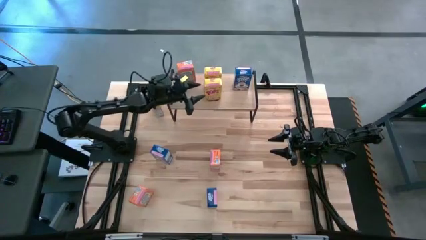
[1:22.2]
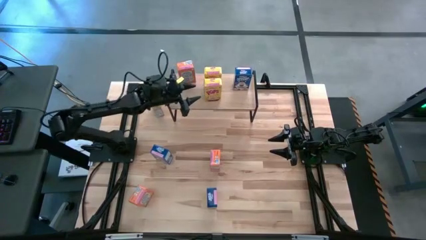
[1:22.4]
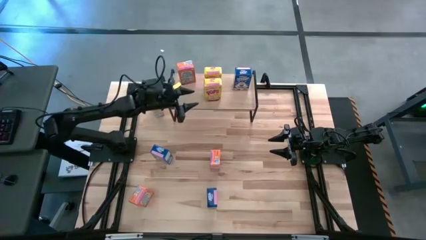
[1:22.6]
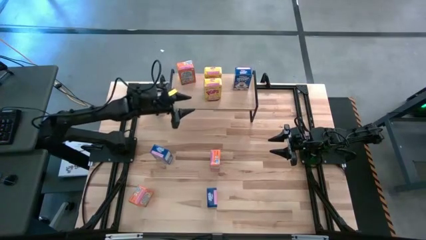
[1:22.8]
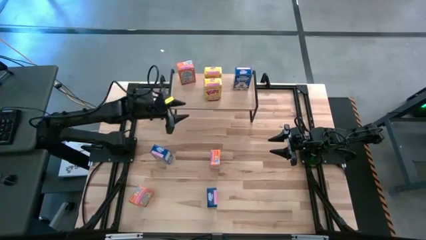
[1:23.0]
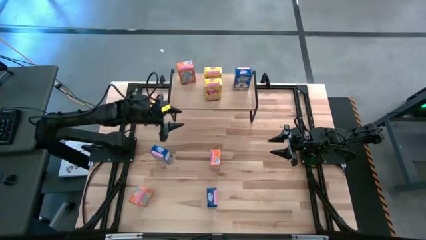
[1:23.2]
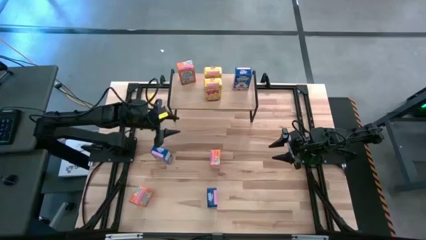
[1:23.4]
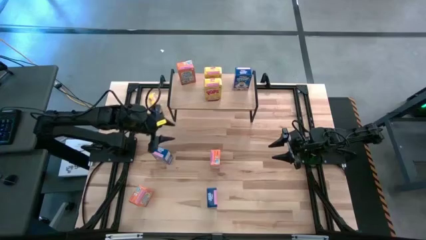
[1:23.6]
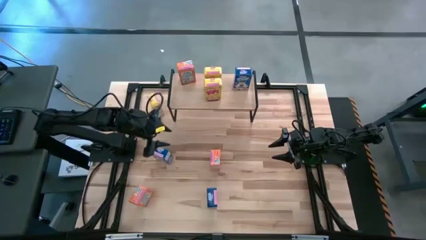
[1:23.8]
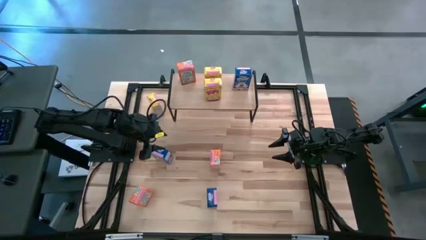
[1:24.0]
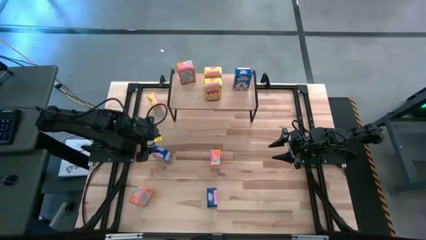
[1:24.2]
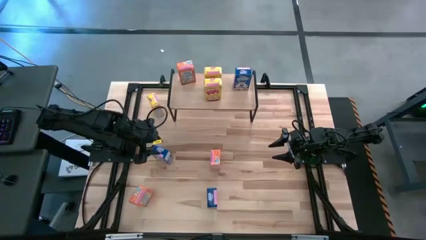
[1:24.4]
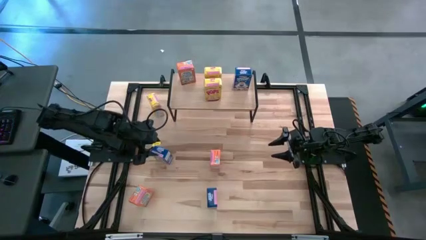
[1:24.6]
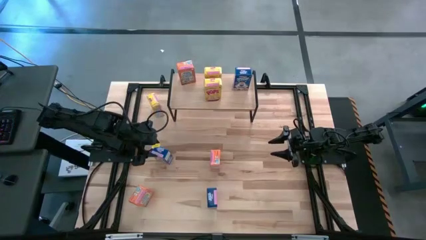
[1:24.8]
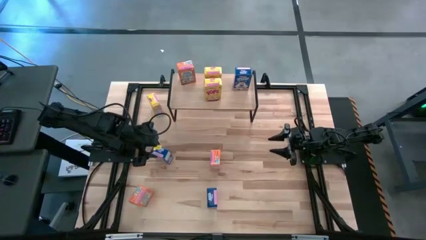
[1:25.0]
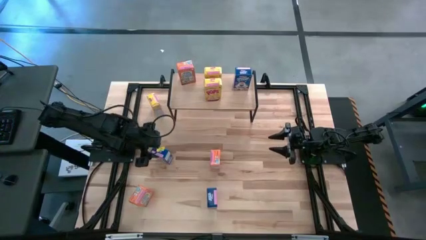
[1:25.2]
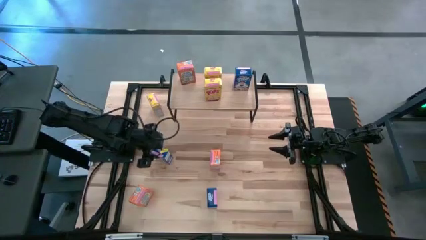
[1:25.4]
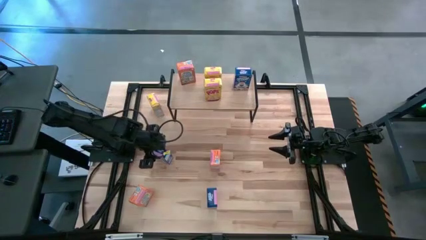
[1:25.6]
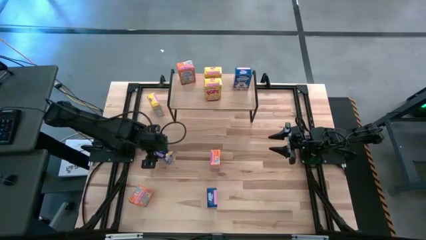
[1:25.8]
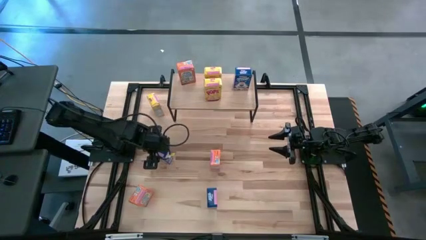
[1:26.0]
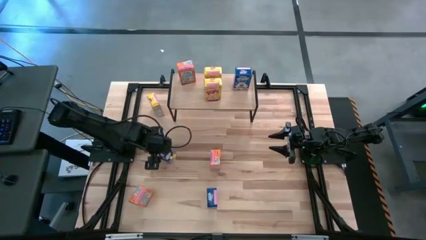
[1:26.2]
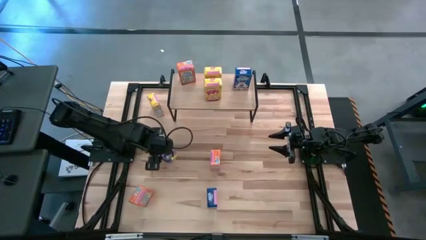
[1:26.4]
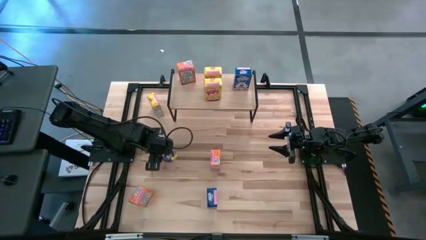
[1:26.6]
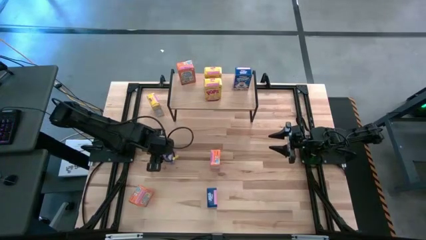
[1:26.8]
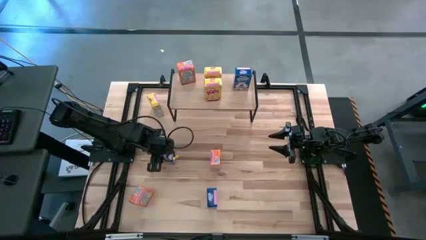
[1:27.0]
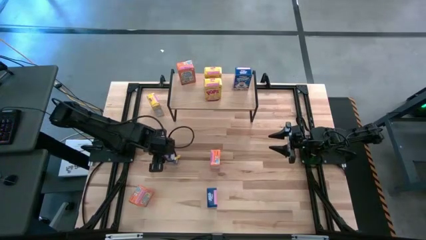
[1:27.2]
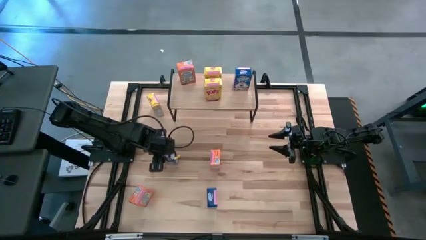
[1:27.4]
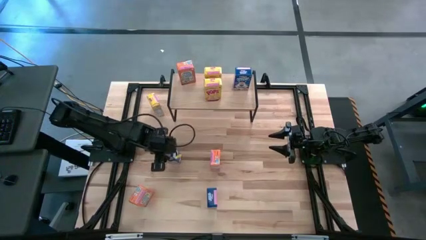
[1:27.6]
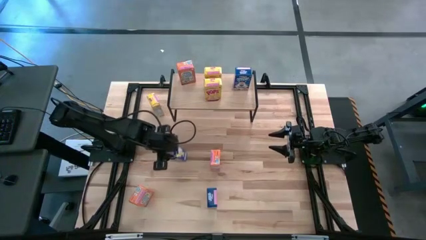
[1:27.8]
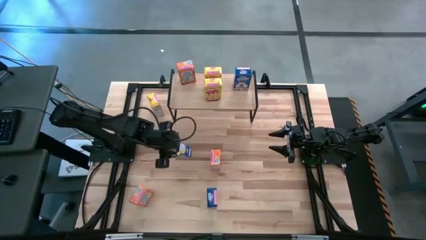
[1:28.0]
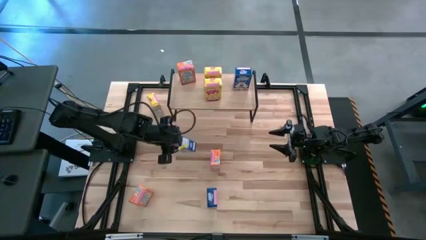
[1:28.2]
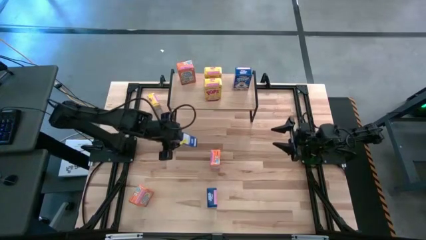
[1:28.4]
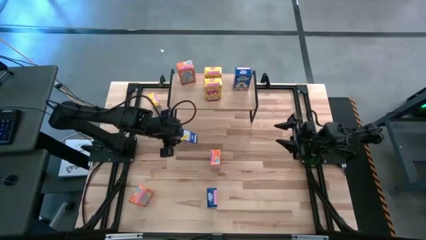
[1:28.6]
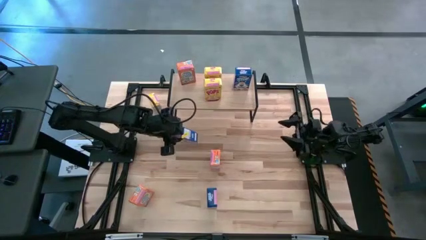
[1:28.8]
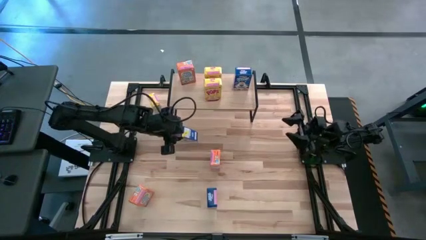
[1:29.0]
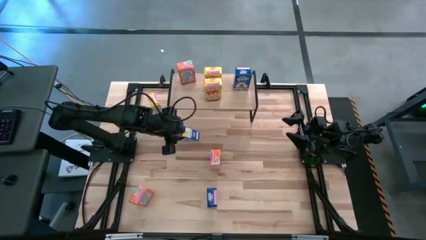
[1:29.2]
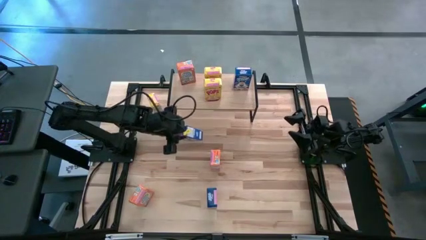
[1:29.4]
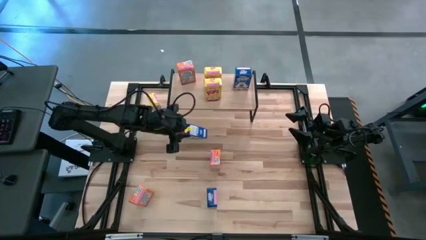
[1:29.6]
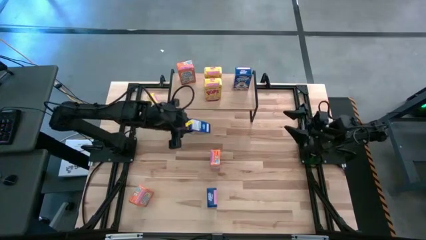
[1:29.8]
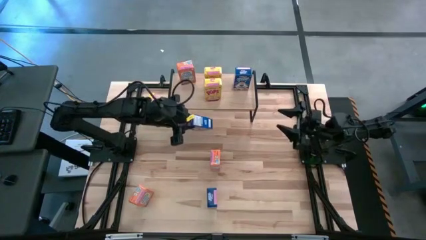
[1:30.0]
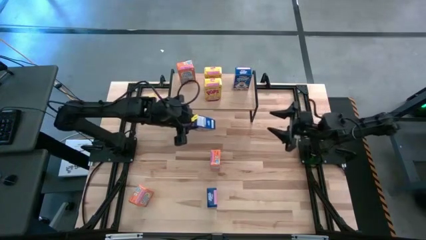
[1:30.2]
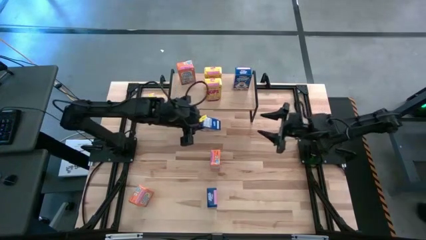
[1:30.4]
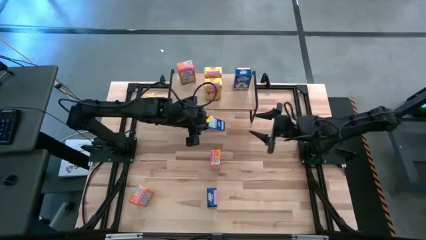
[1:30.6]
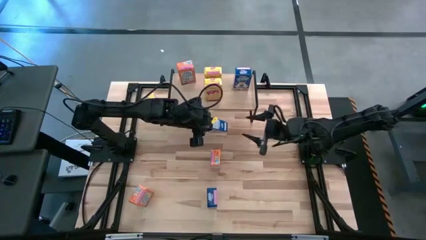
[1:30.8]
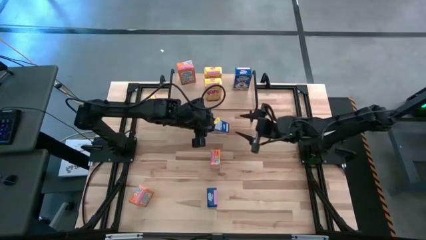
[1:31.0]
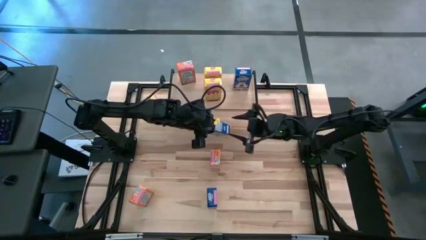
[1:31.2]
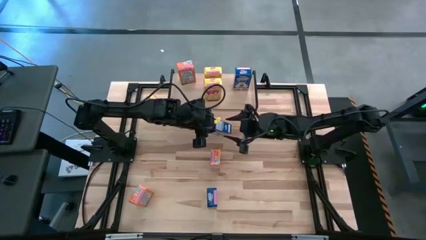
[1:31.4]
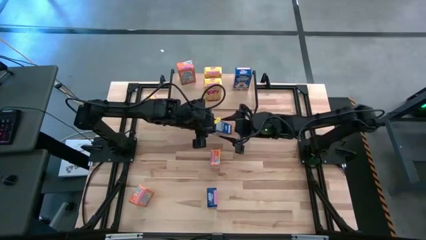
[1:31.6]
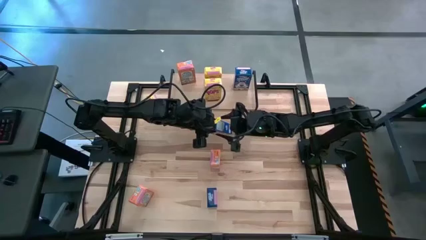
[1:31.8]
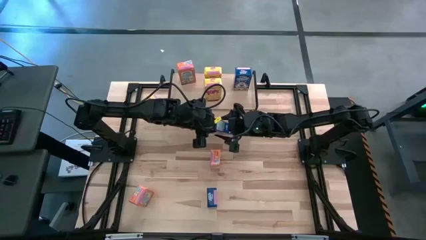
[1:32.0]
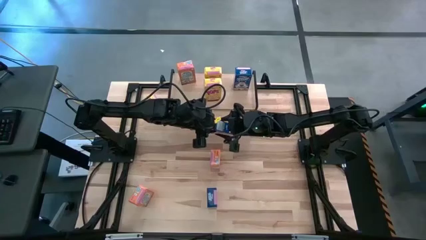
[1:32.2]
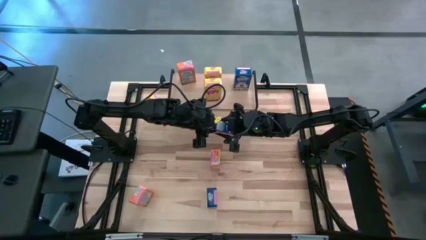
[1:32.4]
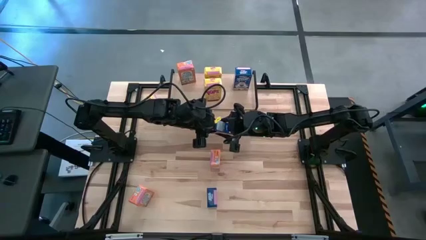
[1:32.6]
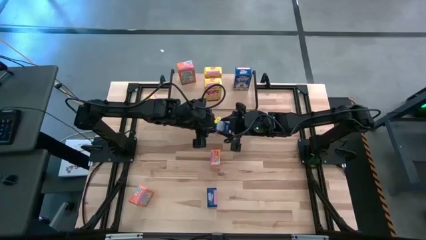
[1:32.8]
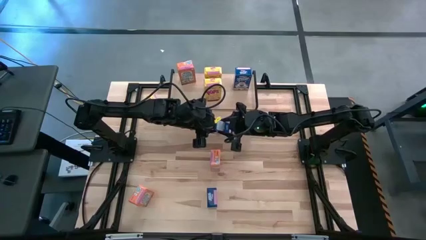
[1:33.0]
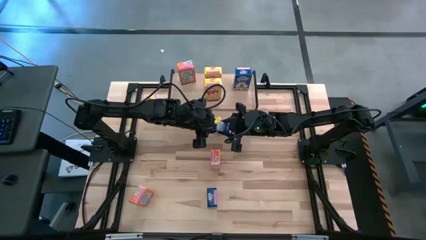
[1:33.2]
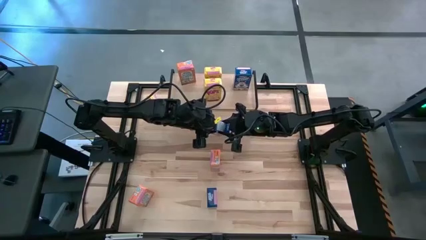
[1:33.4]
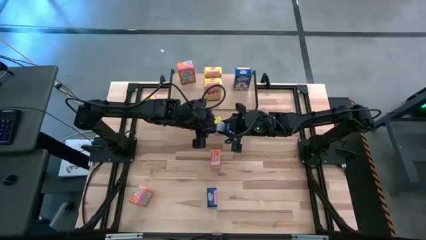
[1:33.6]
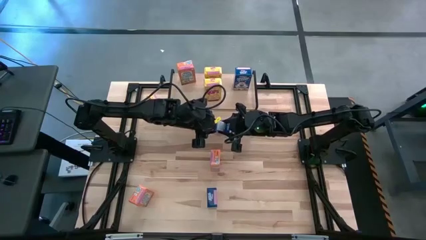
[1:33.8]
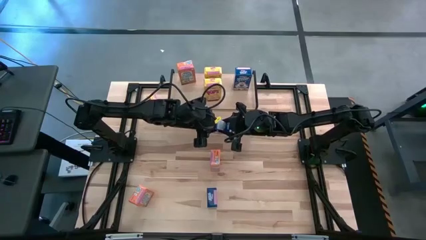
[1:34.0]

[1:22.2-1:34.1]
Task: Stack cereal on shelf
Put the top blue cereal box on the shelf aligned with the other blue cereal box
